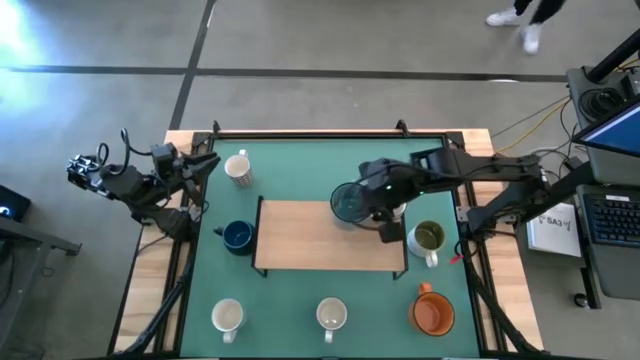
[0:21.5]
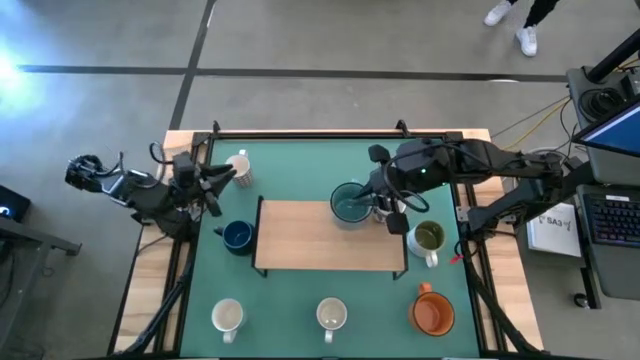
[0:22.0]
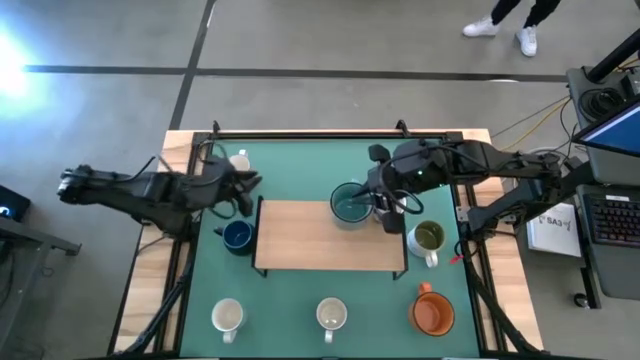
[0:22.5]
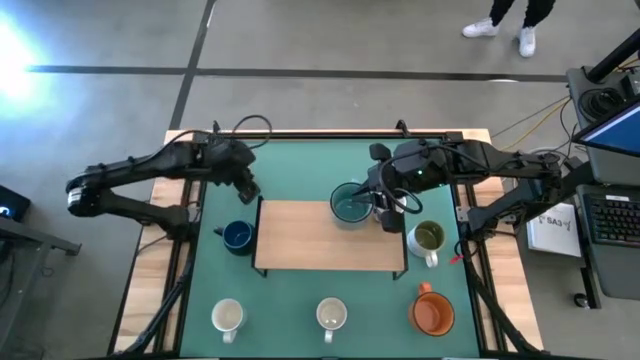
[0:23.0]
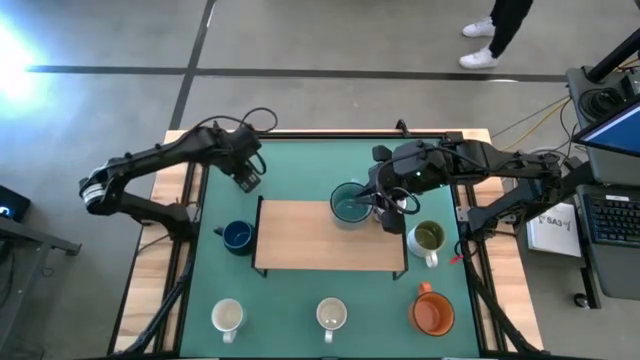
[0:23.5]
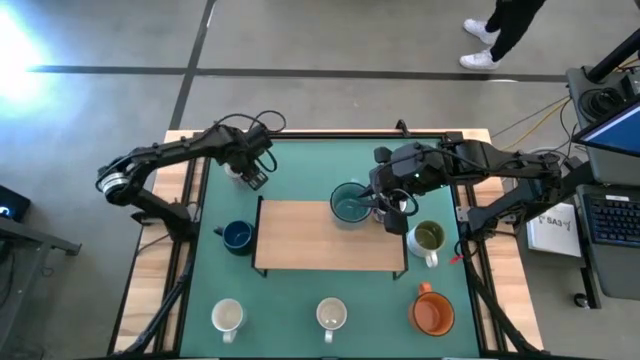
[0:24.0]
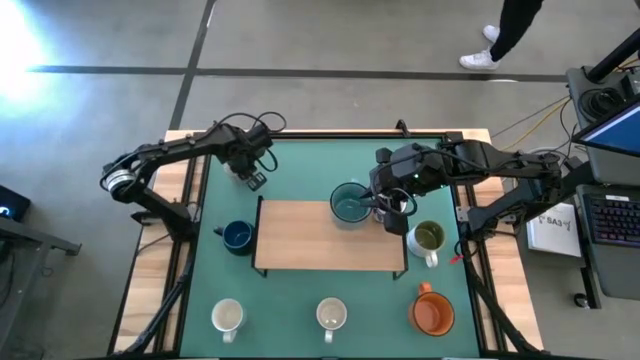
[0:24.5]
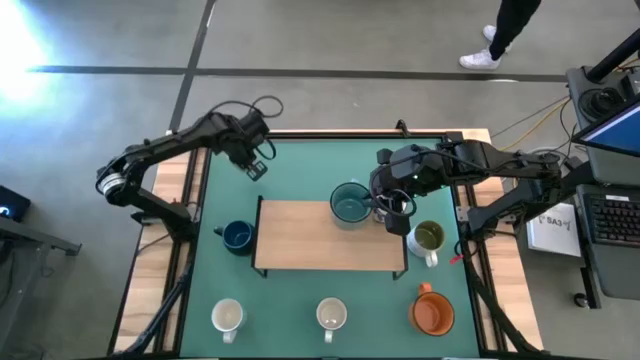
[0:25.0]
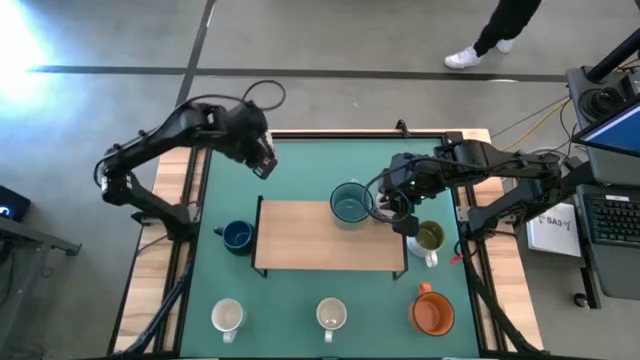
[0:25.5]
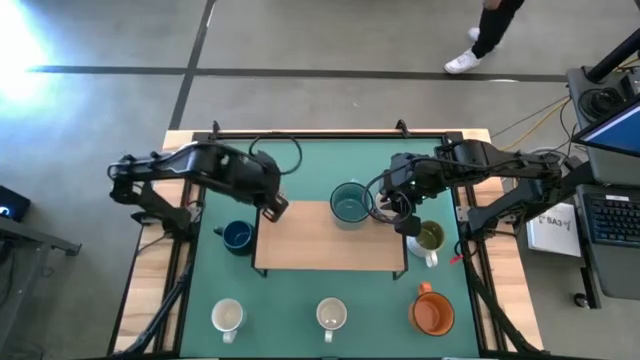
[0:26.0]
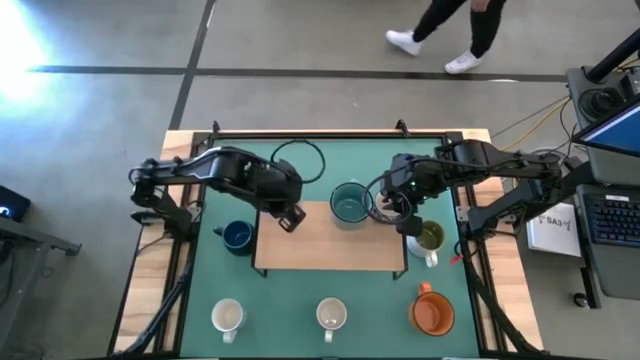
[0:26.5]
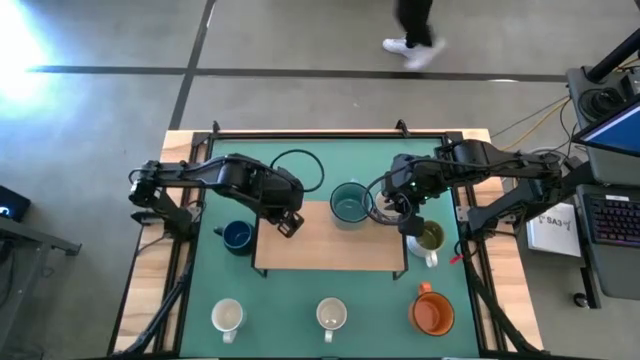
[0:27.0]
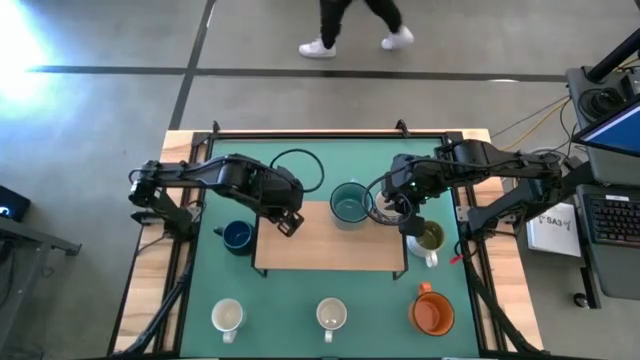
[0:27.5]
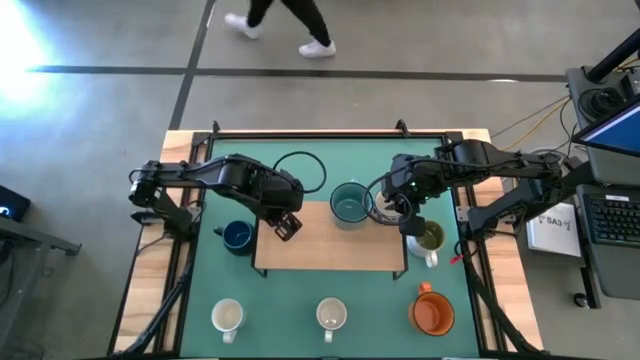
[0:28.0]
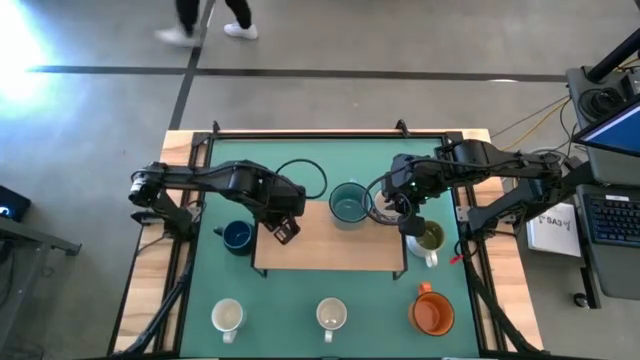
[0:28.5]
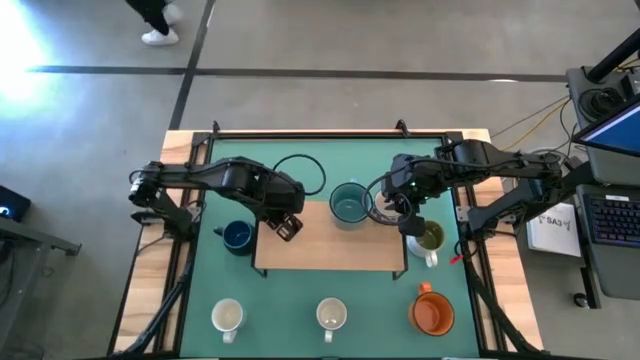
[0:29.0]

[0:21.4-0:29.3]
Task: Place coffee mugs
Put the red patterned mug on the shelf

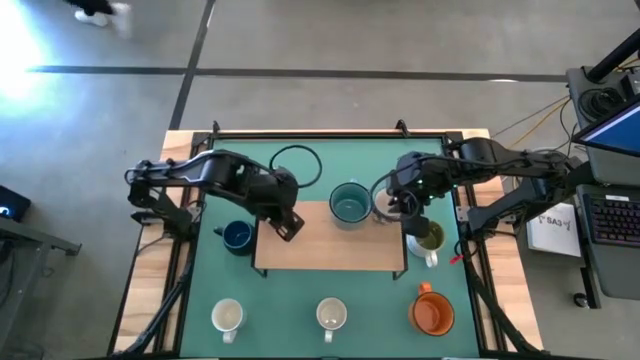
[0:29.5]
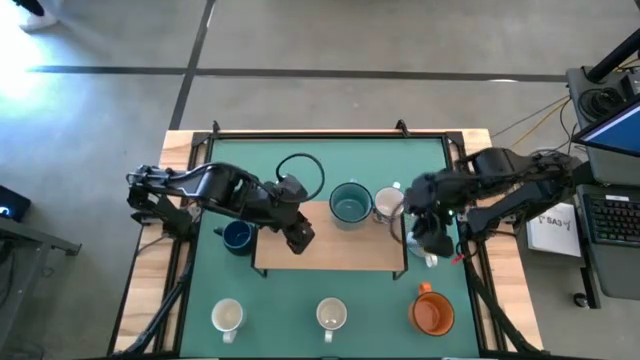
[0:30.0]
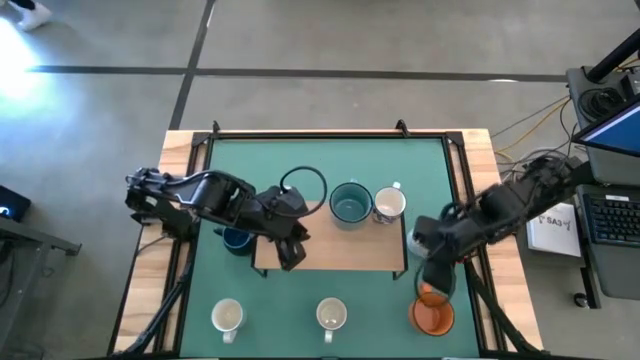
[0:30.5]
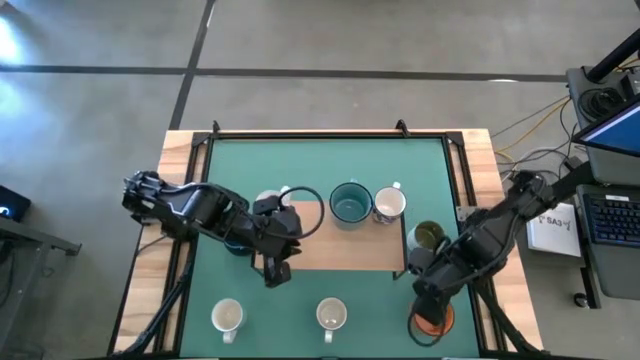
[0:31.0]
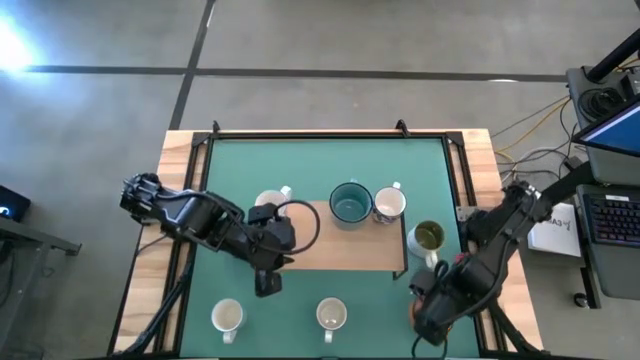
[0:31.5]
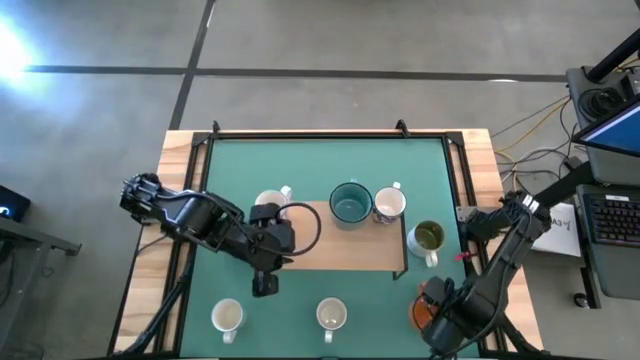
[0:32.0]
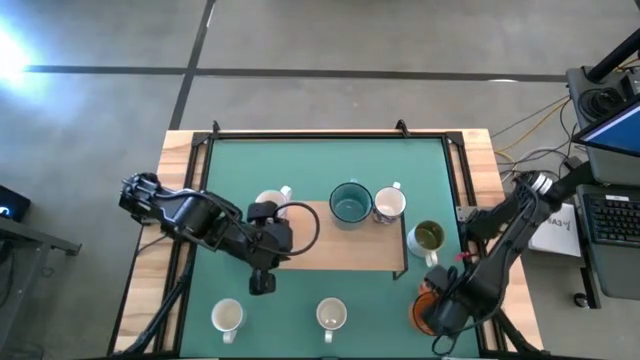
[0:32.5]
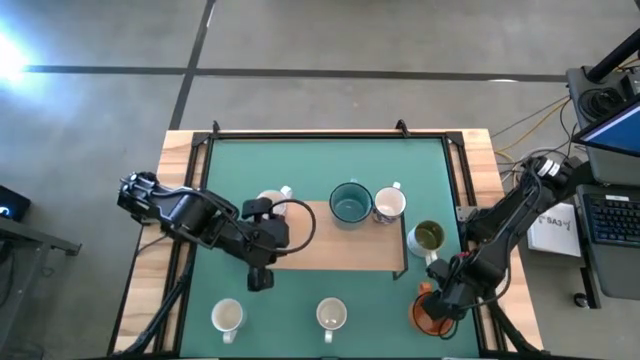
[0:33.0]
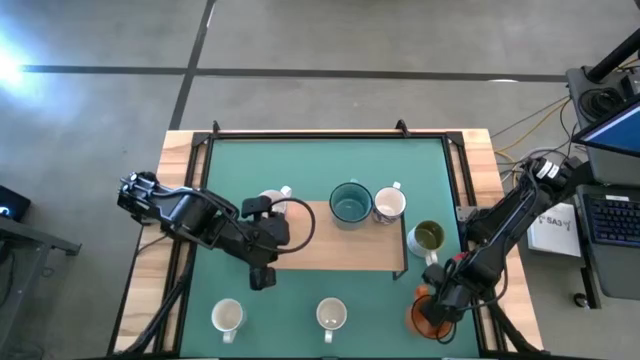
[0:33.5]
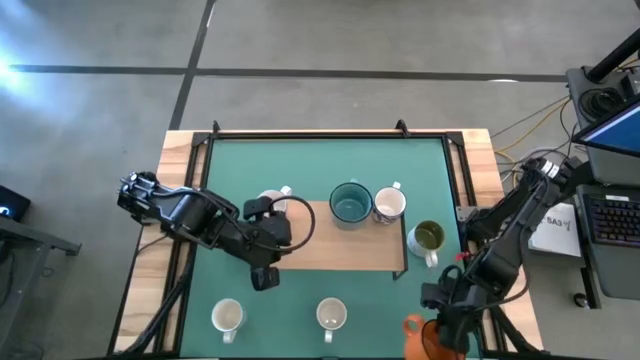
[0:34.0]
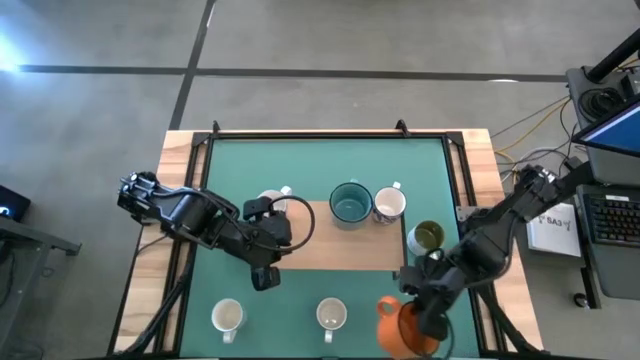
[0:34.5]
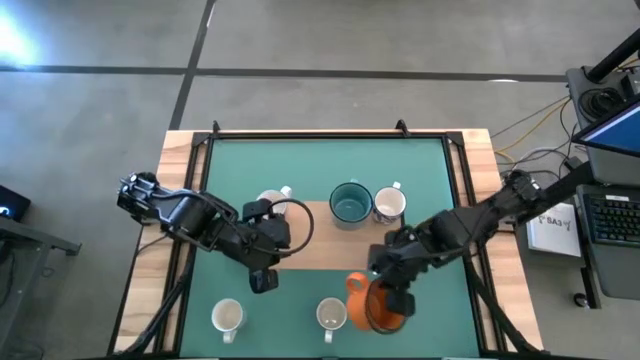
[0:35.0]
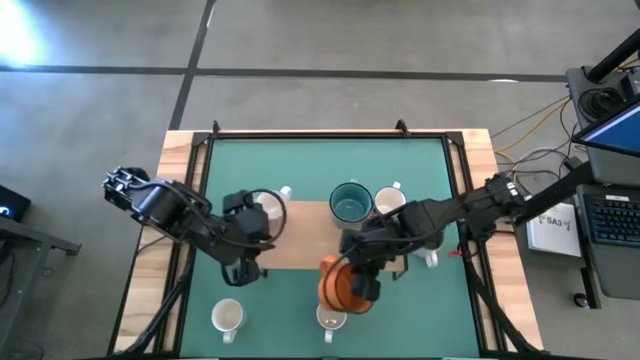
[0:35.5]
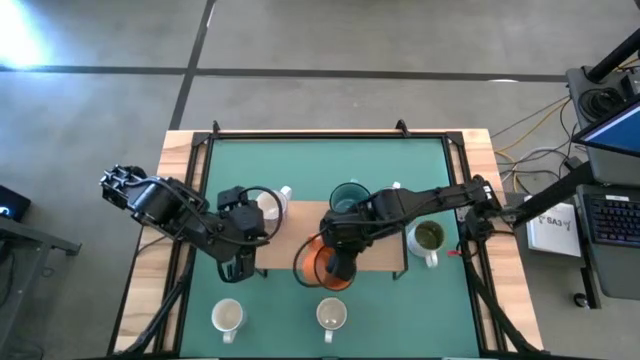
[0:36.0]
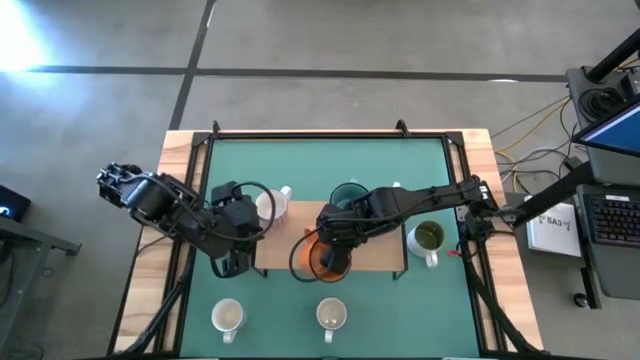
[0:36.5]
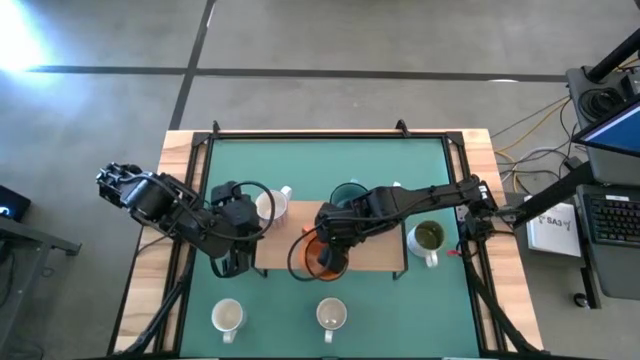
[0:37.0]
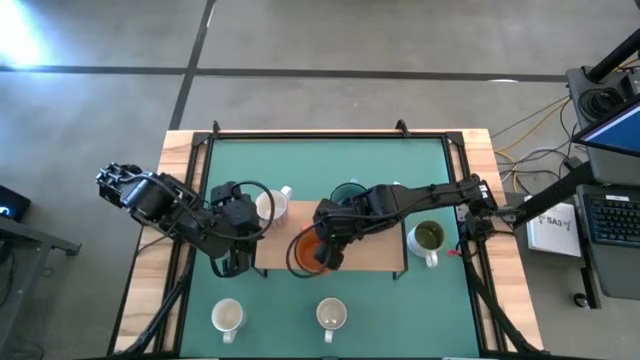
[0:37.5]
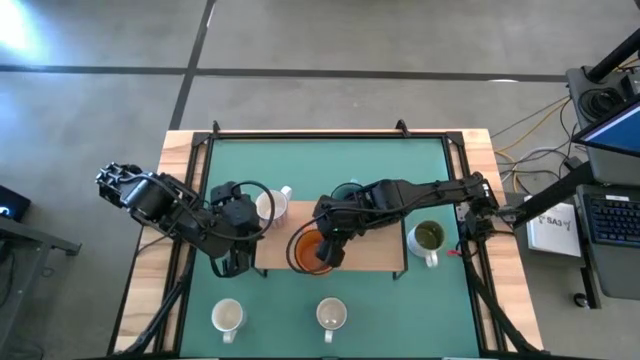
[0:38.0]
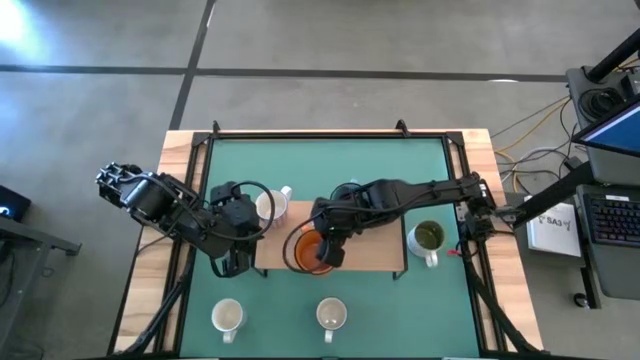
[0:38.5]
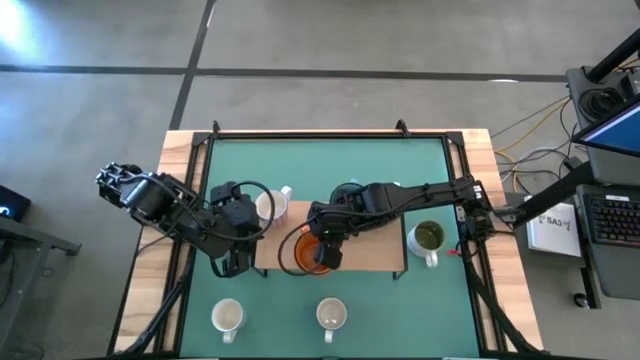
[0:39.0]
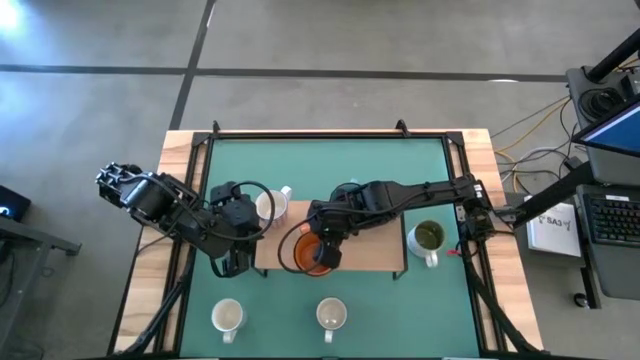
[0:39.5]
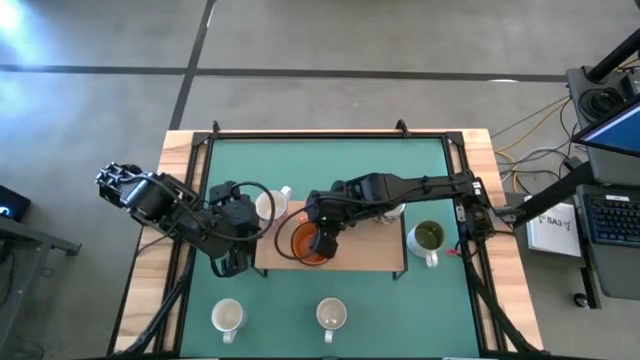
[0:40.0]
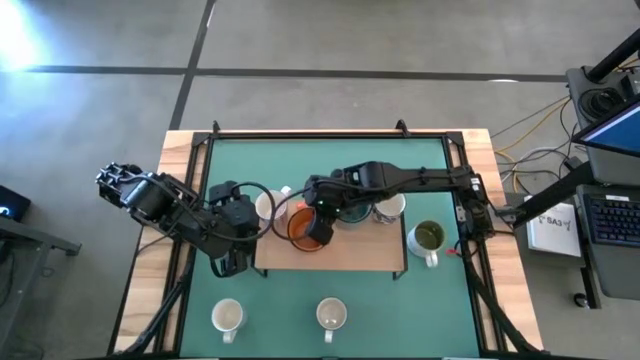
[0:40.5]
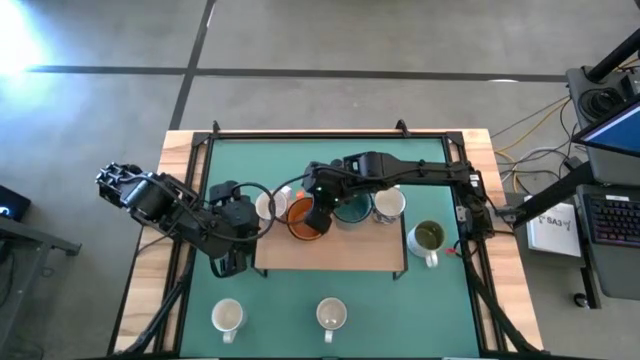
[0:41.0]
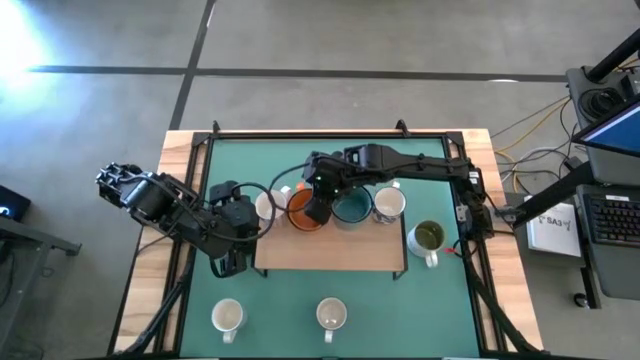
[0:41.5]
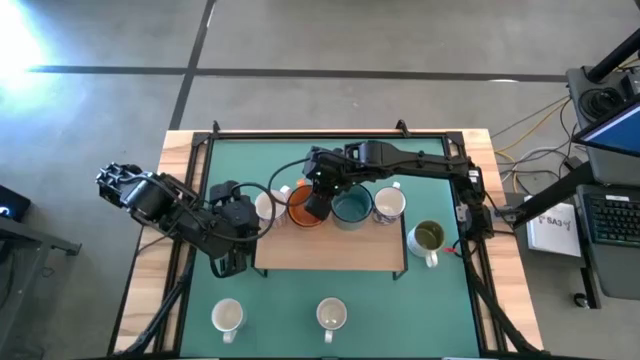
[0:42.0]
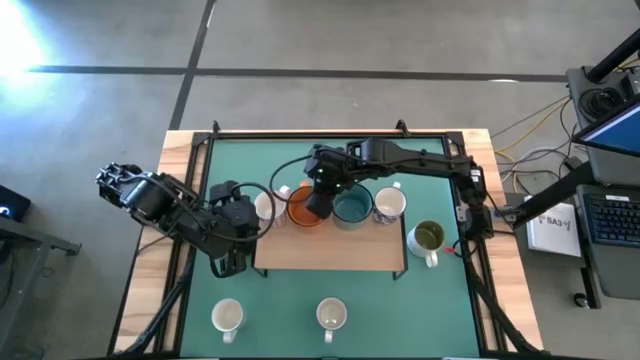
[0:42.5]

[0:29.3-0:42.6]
Put the orange mug on the shelf
